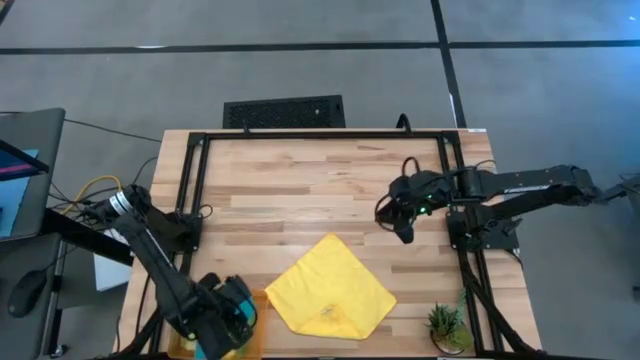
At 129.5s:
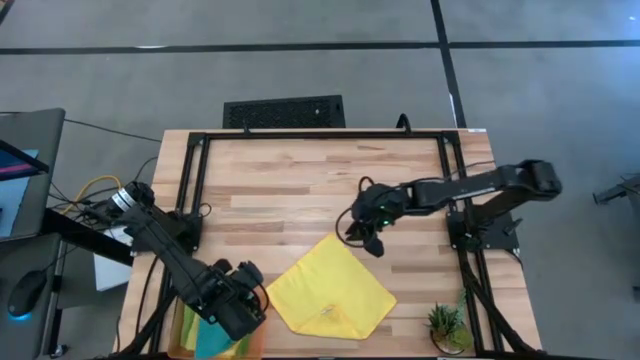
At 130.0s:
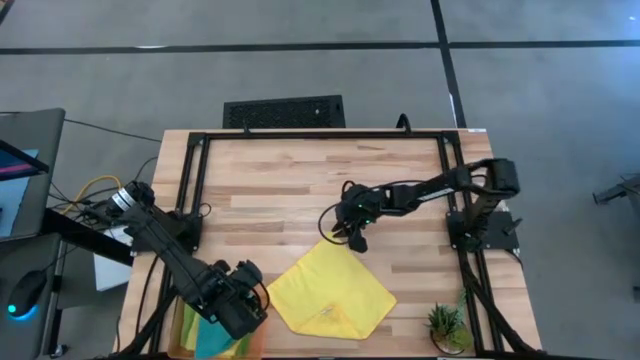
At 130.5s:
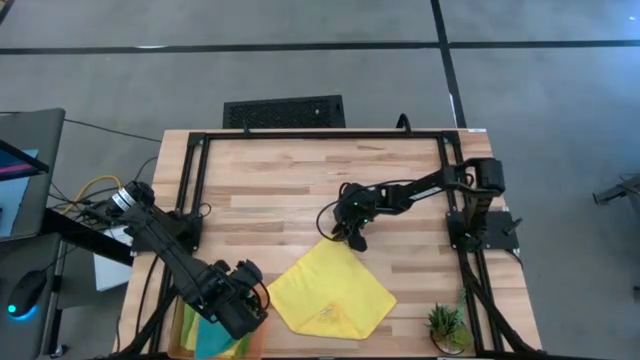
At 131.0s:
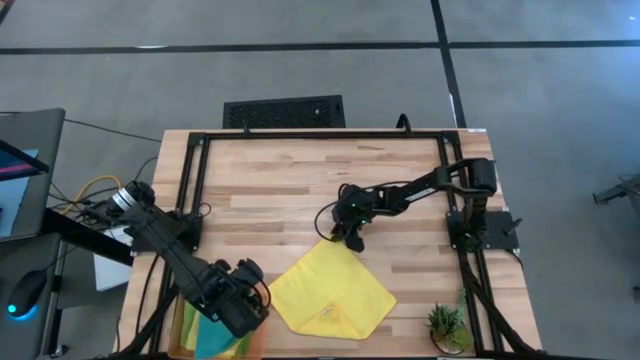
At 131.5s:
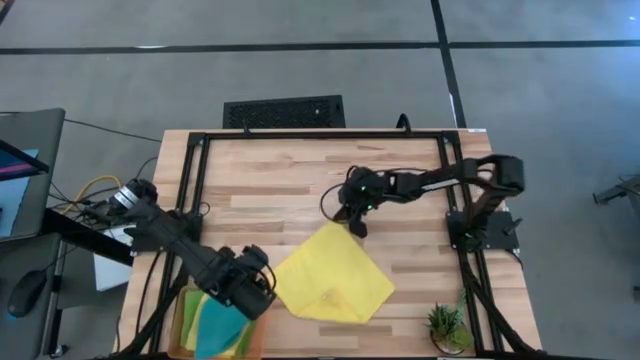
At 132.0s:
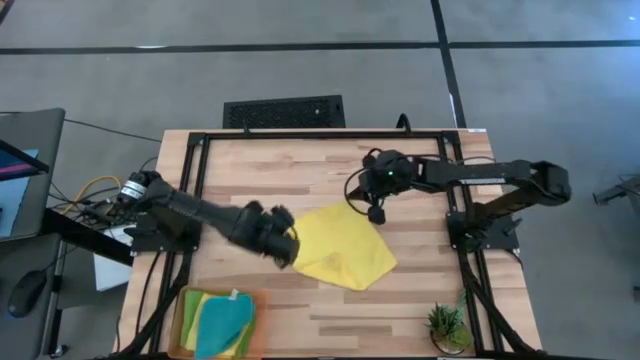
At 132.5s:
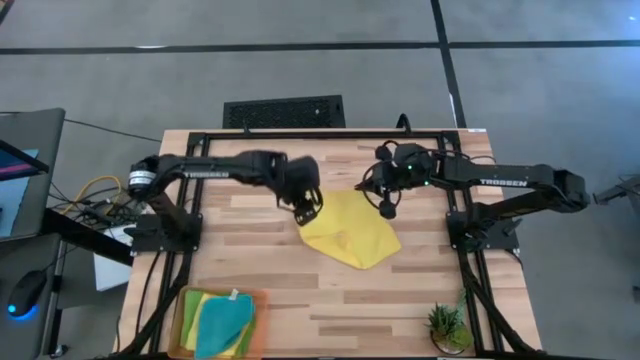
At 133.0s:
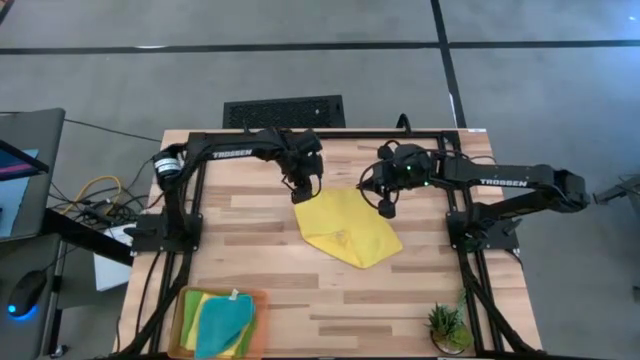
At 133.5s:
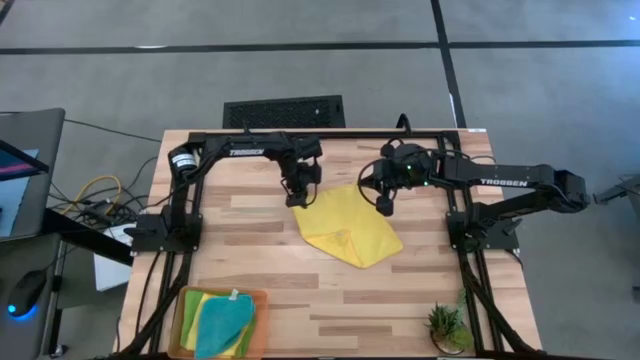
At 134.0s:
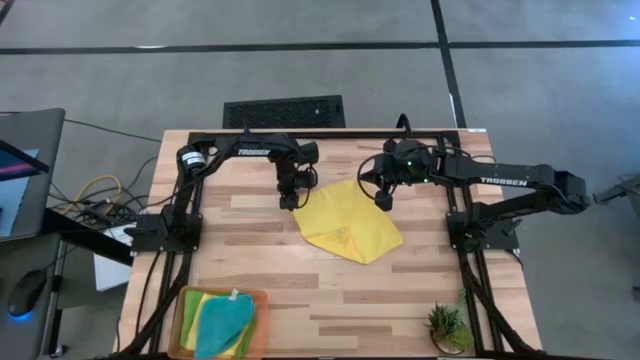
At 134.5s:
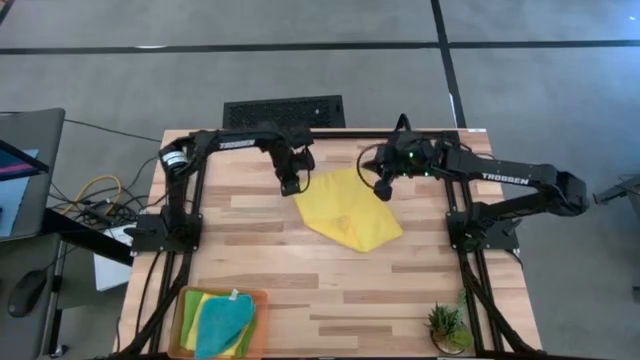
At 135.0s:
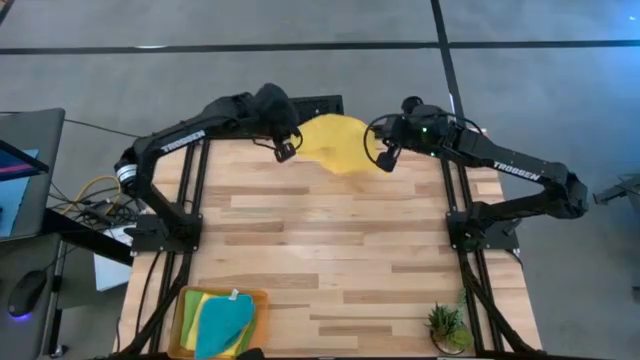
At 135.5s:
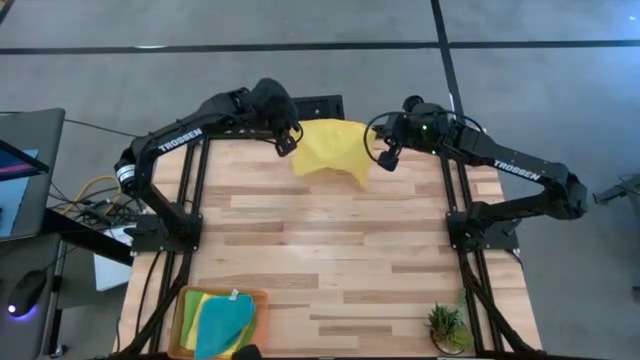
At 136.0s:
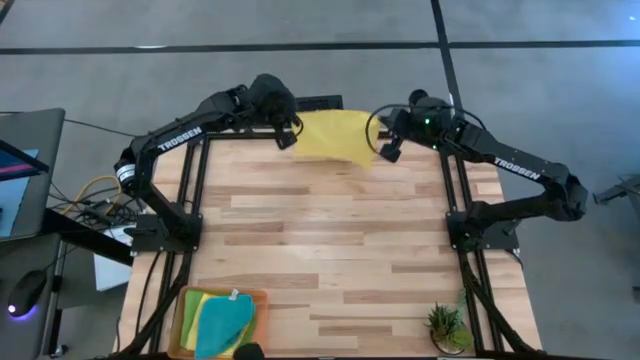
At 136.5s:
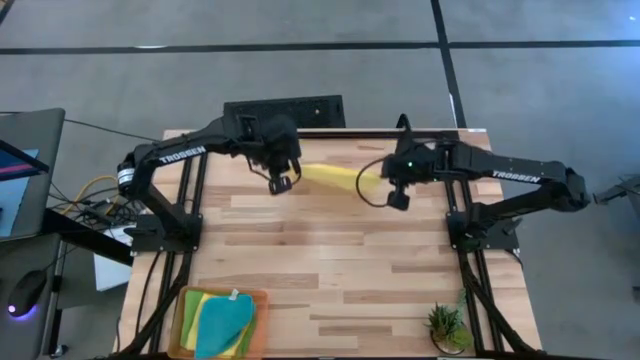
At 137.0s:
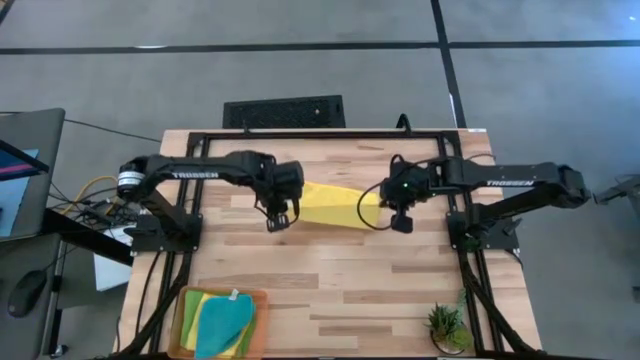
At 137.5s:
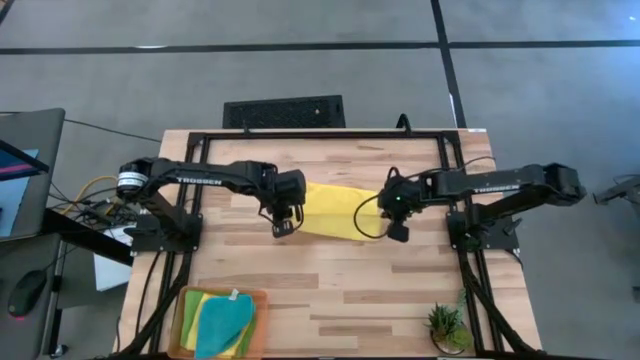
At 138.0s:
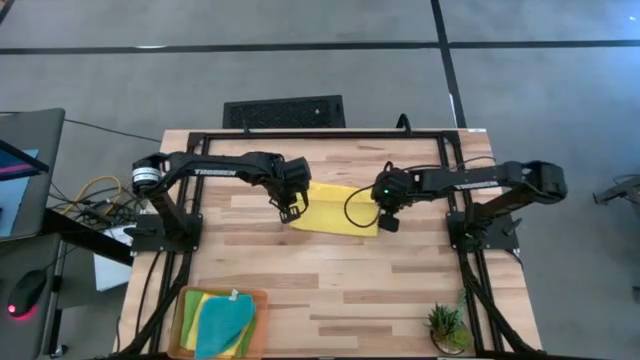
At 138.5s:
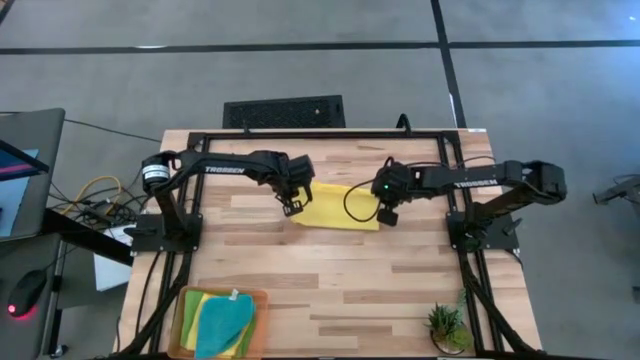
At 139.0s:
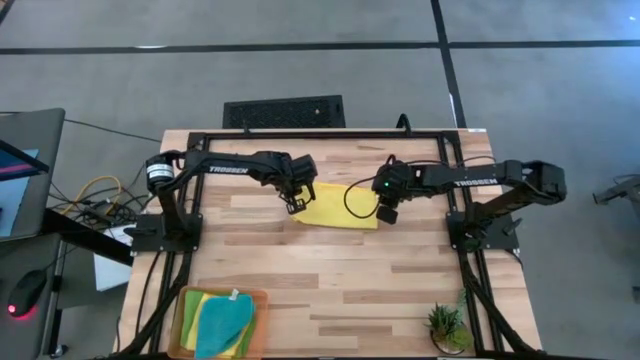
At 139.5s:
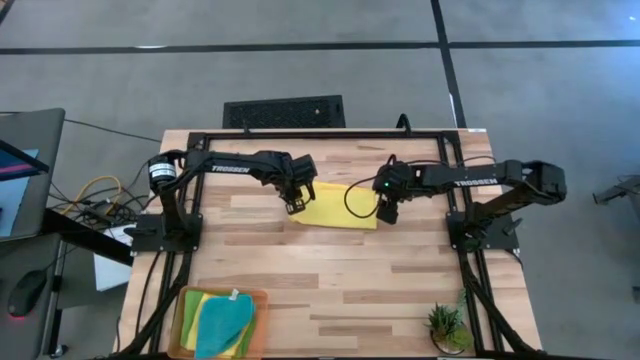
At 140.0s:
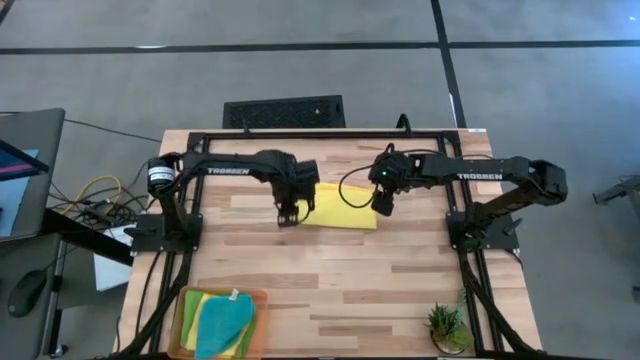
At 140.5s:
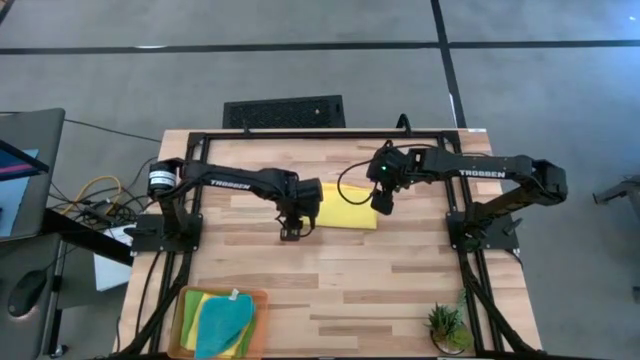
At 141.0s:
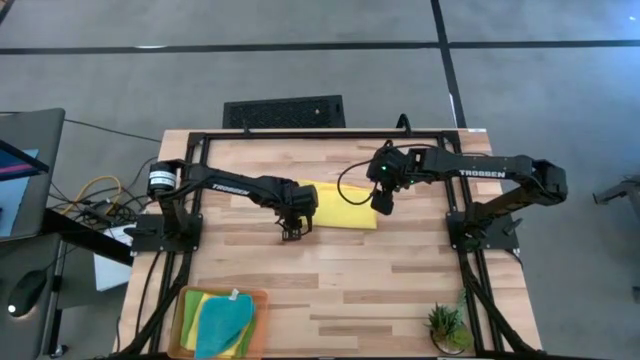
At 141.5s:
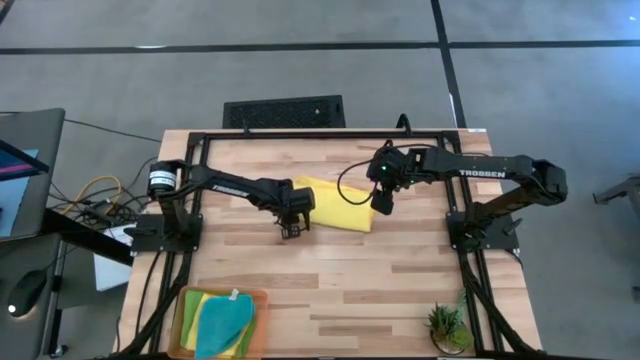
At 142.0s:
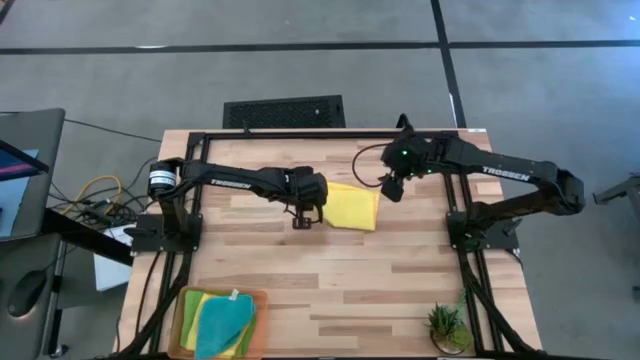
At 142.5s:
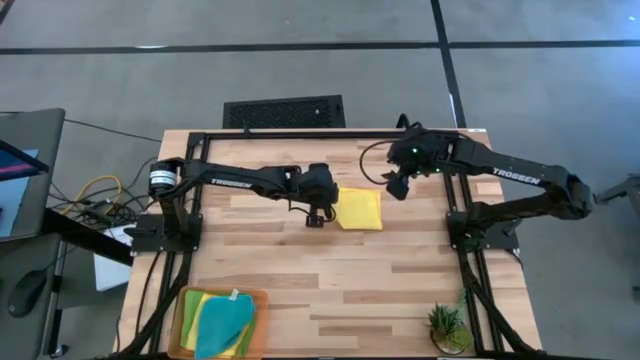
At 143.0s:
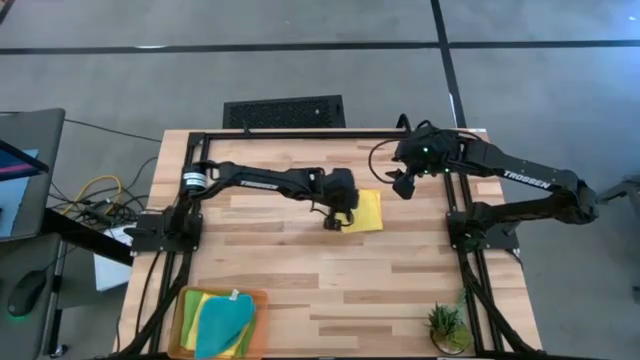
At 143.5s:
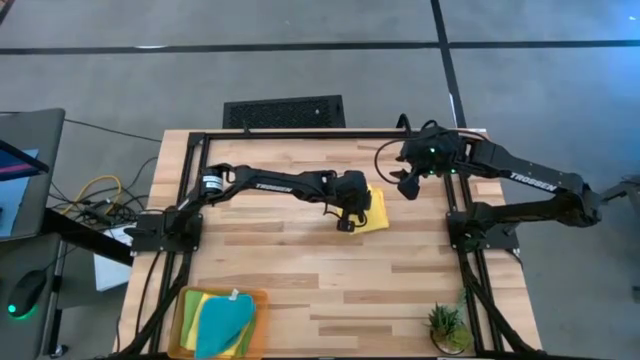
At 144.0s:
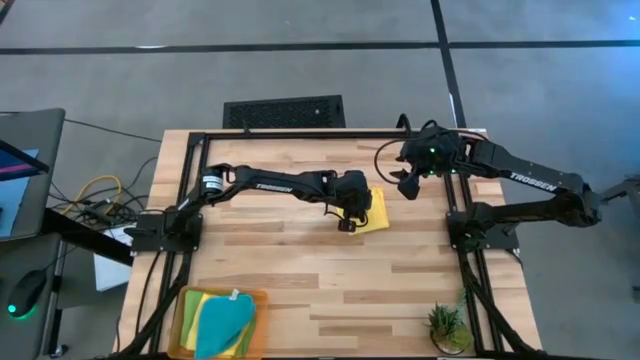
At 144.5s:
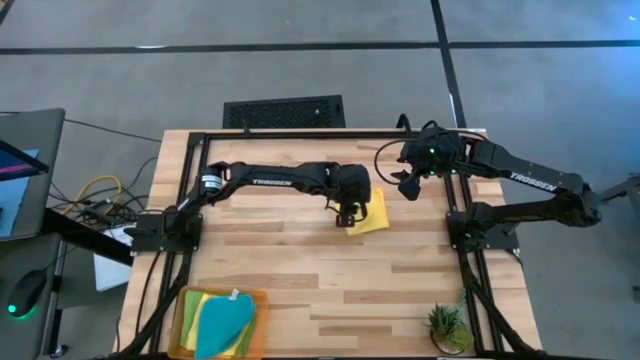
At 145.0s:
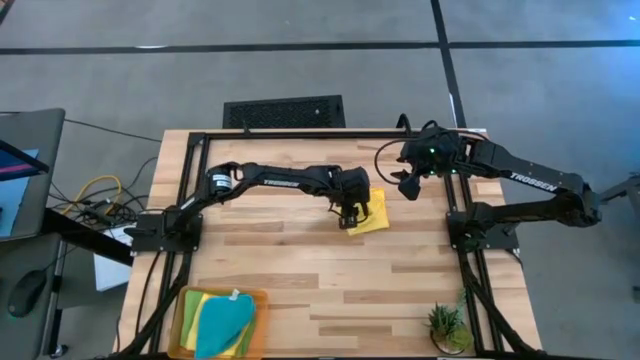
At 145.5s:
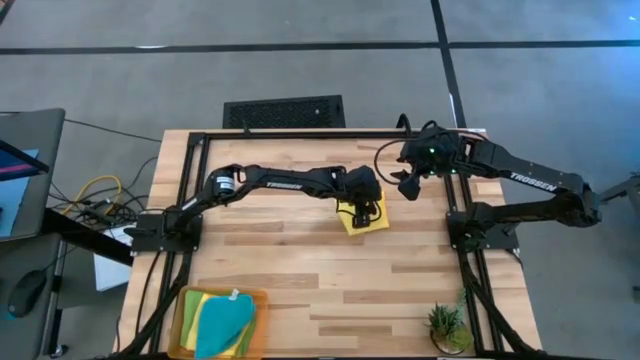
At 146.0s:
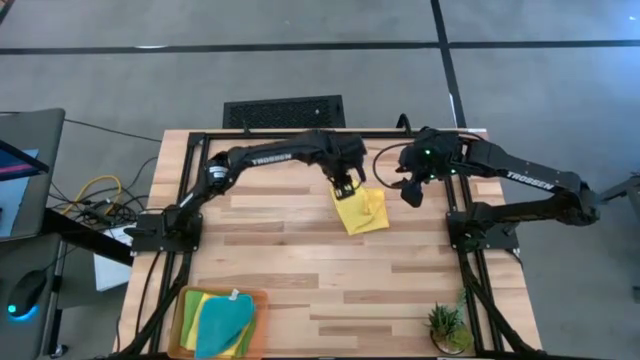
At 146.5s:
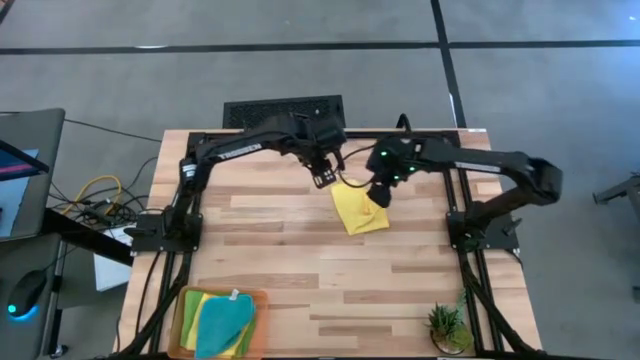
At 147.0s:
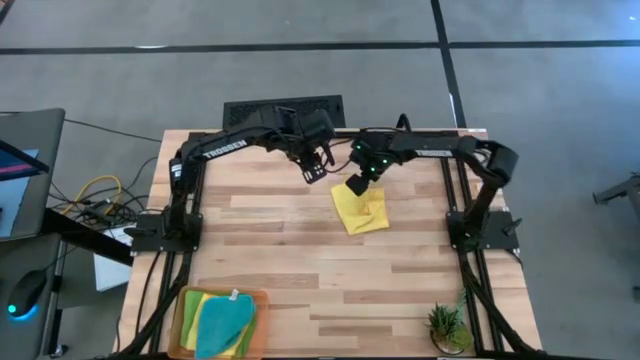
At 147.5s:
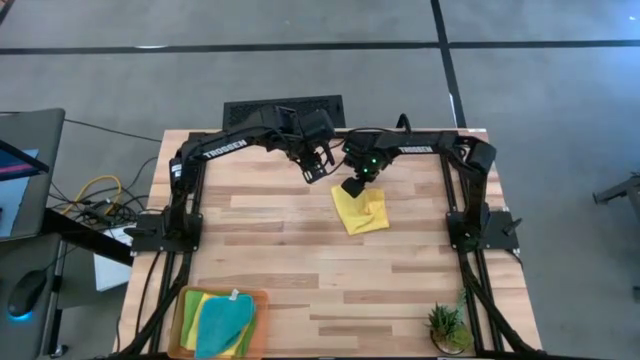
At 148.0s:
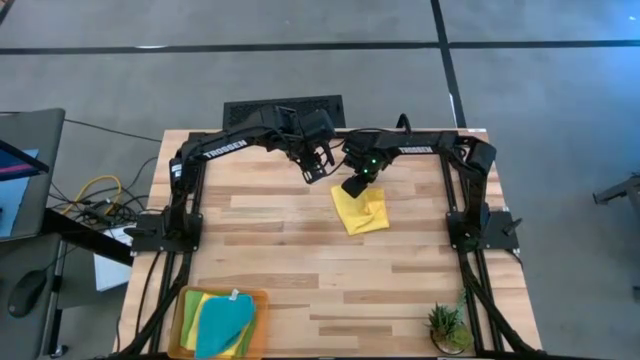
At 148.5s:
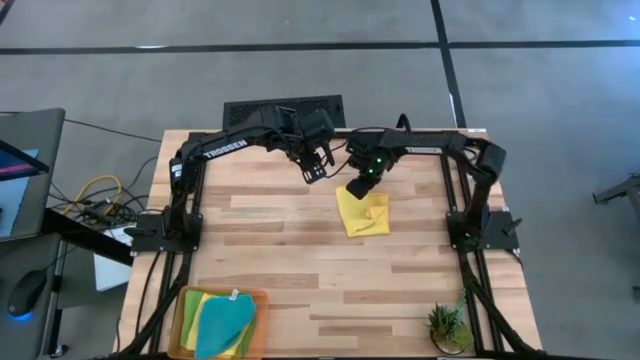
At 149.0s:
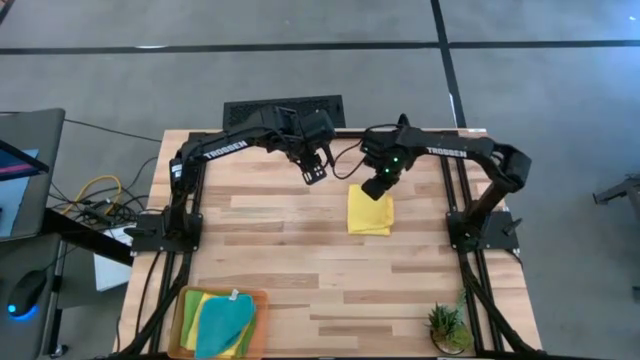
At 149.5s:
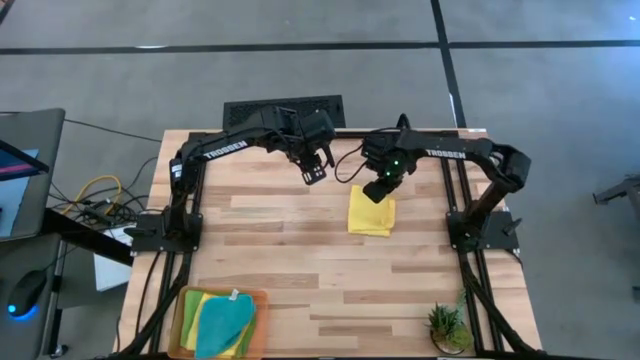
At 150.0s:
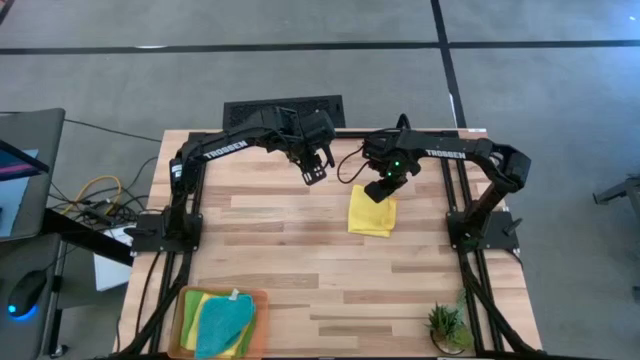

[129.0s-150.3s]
Task: Fold microfiber towels
Fold the yellow microfiber towel

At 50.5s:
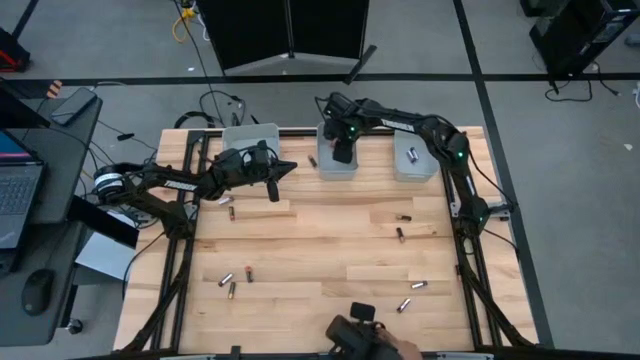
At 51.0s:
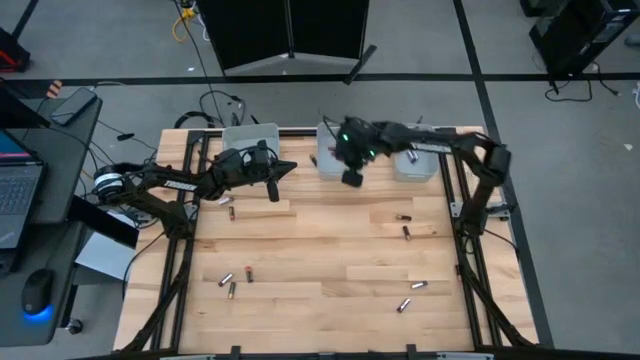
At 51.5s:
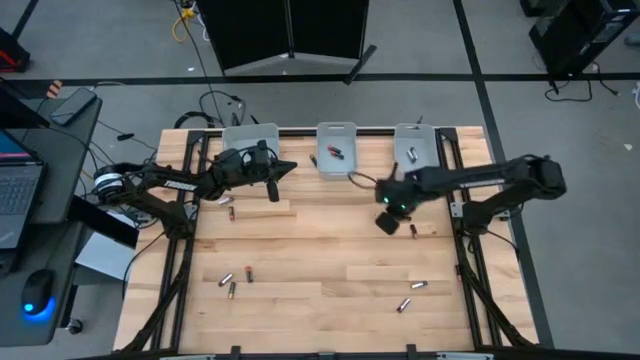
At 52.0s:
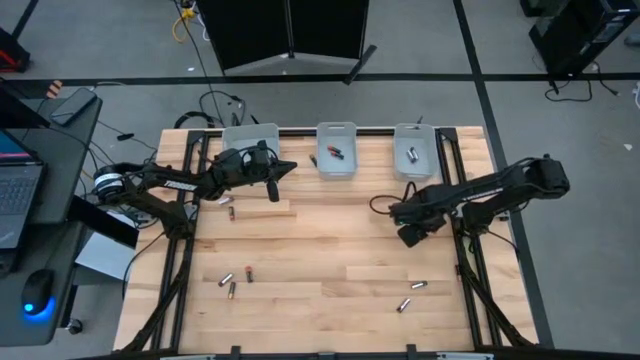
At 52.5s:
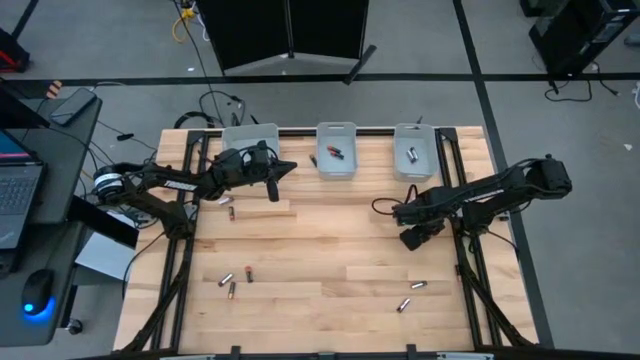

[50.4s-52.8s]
Task: Sort batteries
Put the black brown battery into the left bin
